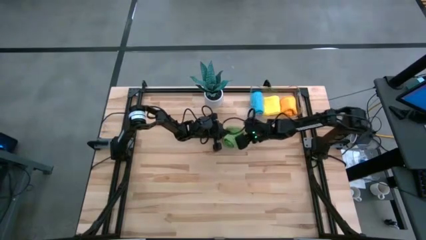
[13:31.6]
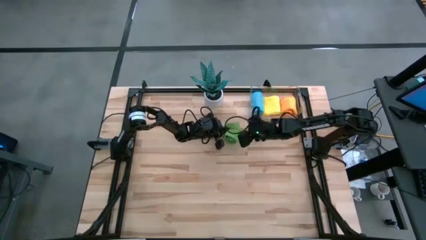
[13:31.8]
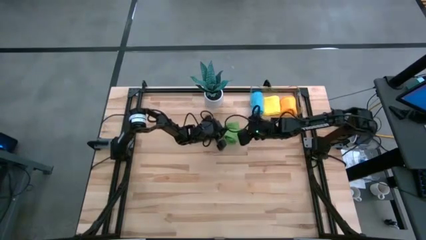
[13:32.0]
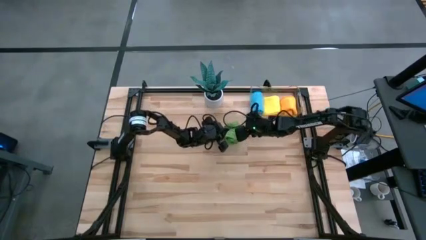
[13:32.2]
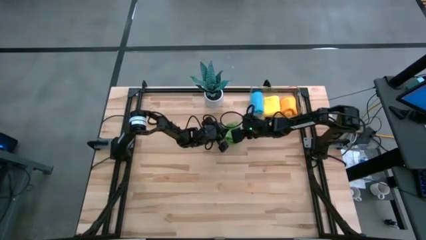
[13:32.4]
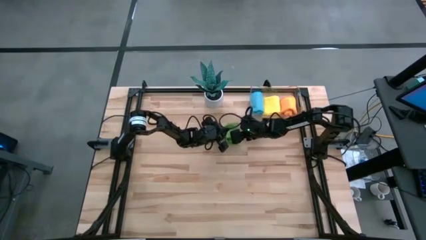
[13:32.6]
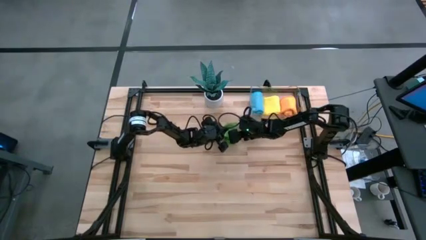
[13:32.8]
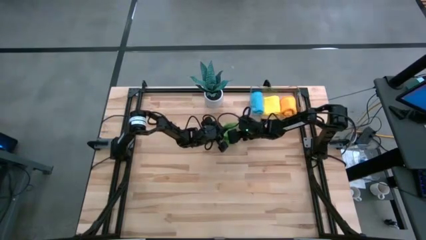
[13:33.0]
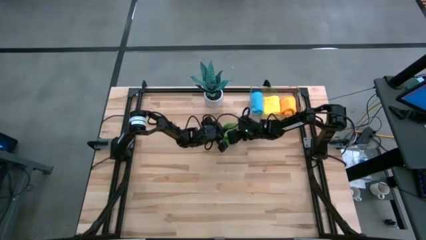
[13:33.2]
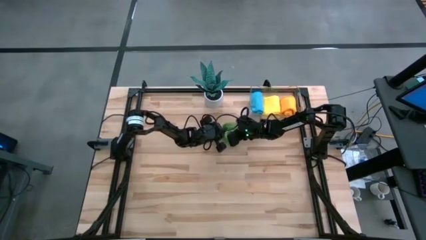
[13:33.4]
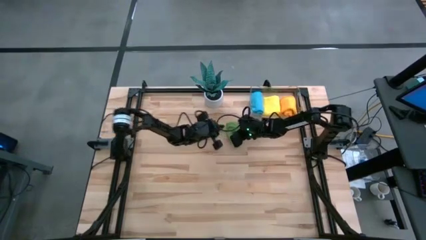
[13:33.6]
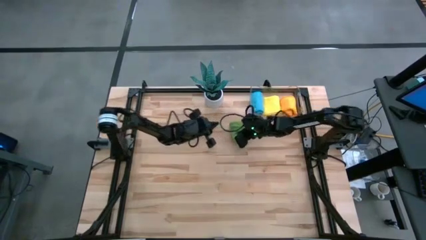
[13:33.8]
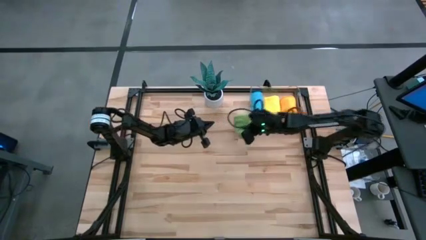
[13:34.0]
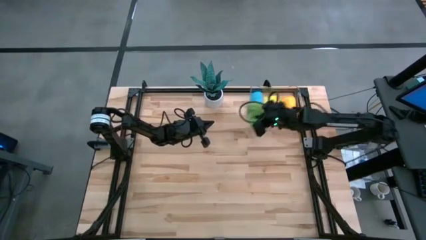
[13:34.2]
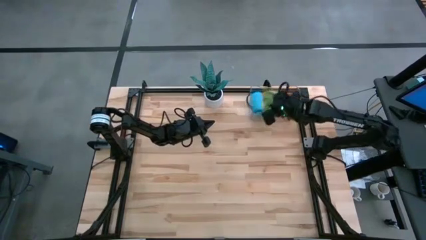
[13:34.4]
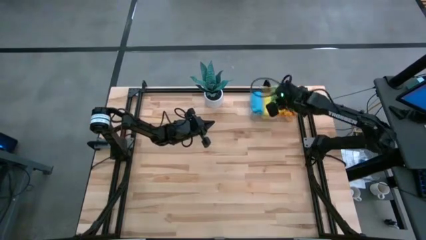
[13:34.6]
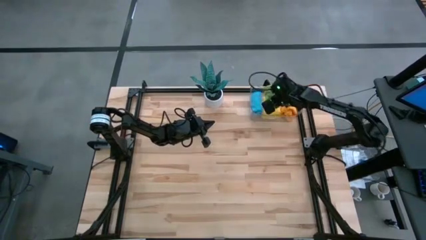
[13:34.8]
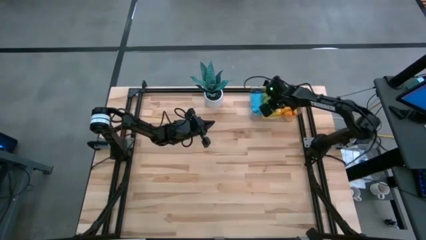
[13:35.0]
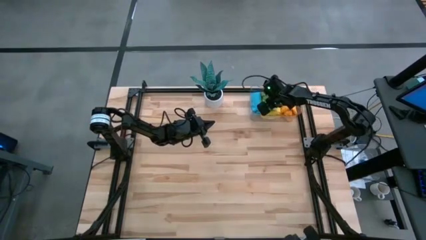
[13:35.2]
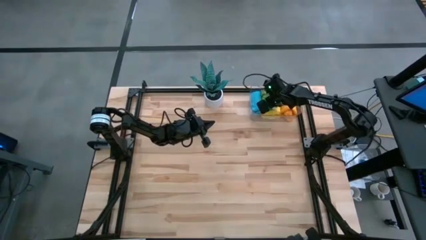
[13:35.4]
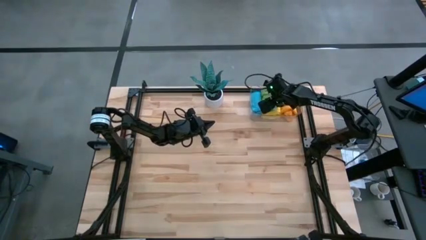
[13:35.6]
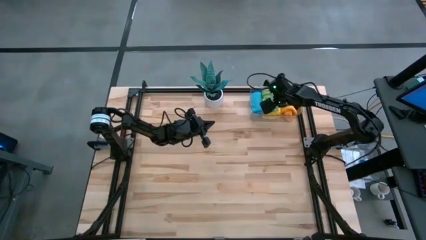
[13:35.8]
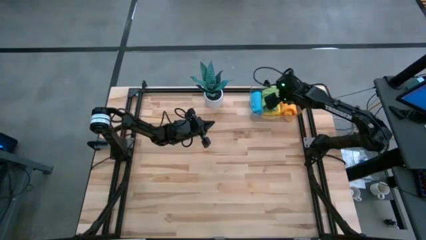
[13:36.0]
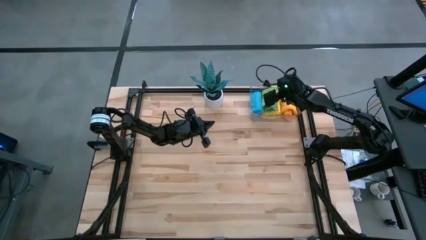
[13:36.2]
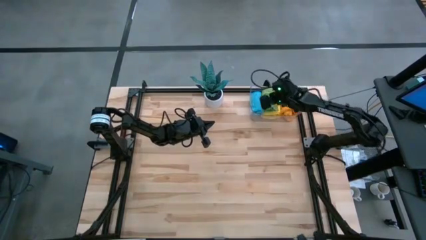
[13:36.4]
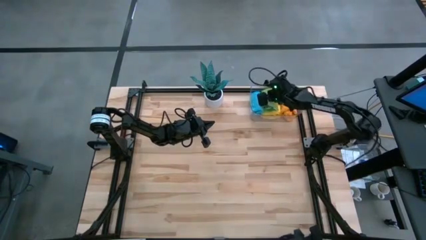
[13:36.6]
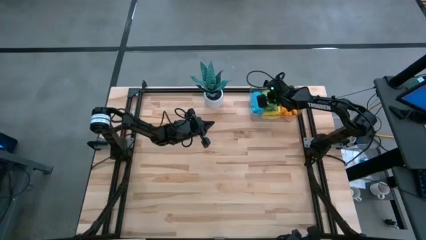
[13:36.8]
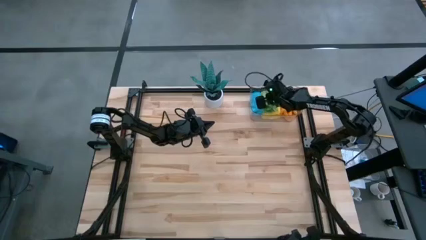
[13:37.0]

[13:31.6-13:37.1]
Task: Roll microfiber towels into tight, uniform cylinder then place into a basket
Put the green microfiber cloth into the transparent bin

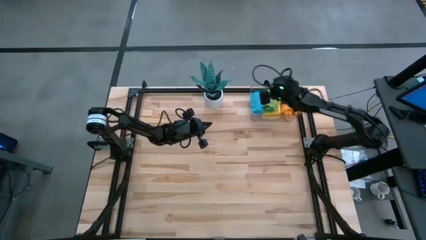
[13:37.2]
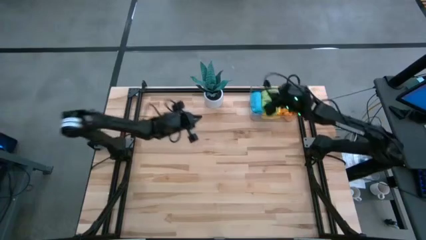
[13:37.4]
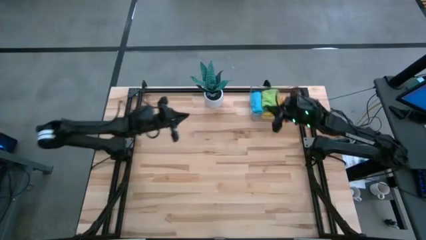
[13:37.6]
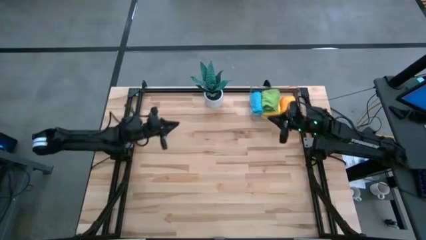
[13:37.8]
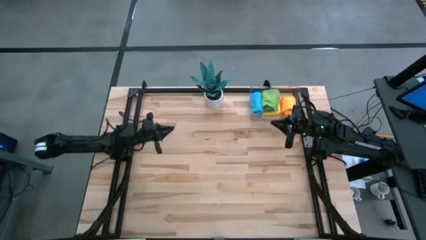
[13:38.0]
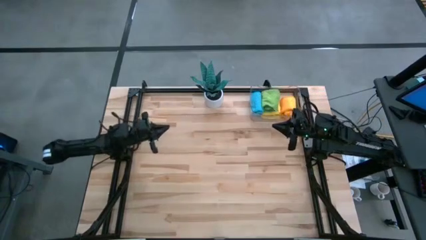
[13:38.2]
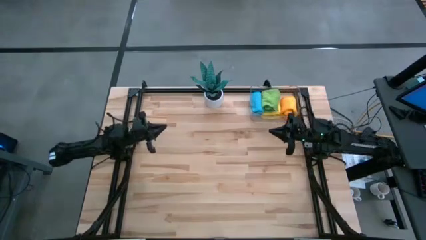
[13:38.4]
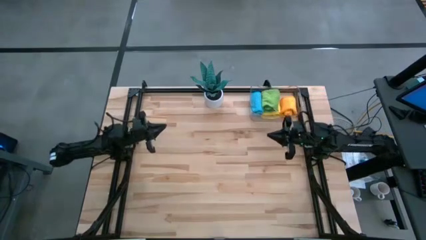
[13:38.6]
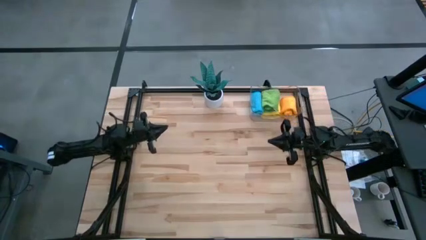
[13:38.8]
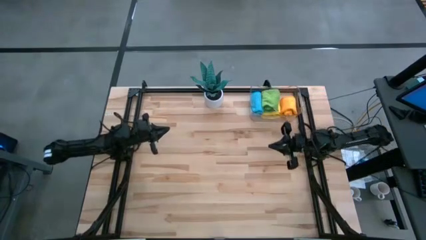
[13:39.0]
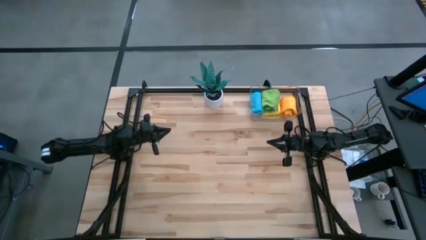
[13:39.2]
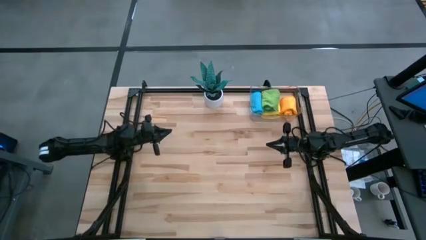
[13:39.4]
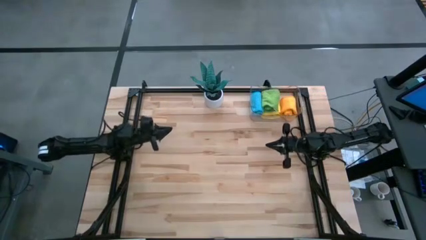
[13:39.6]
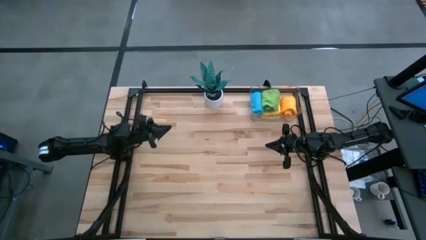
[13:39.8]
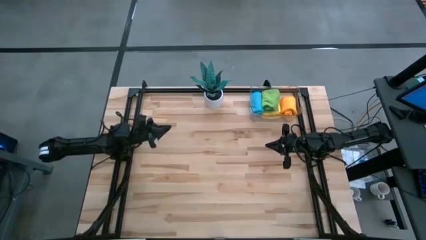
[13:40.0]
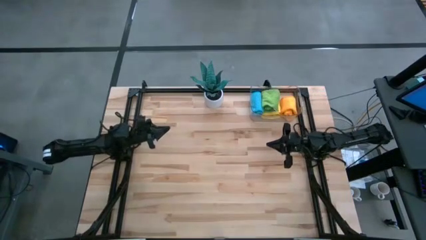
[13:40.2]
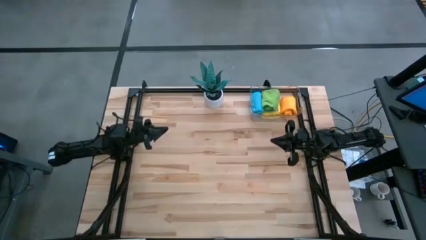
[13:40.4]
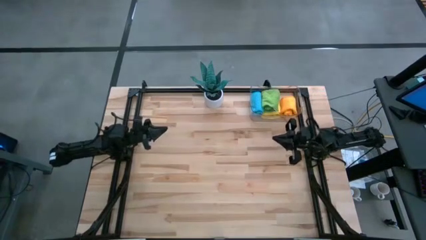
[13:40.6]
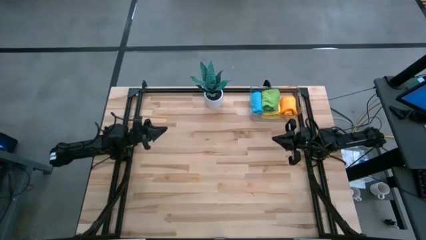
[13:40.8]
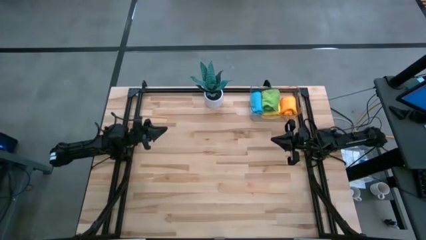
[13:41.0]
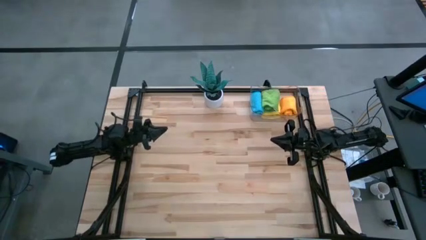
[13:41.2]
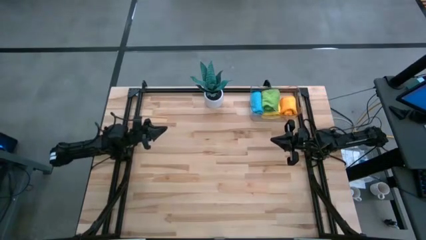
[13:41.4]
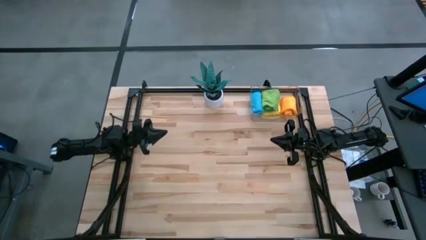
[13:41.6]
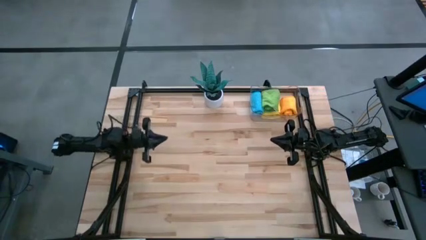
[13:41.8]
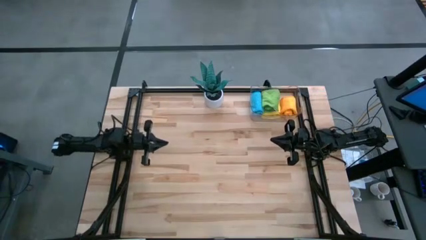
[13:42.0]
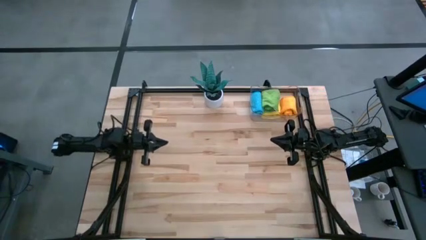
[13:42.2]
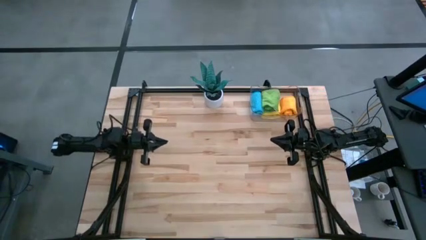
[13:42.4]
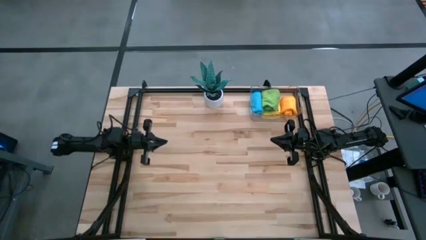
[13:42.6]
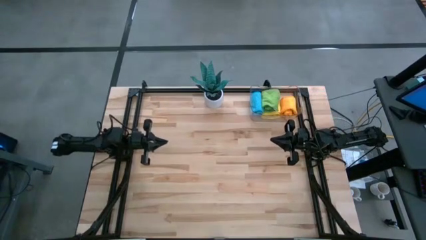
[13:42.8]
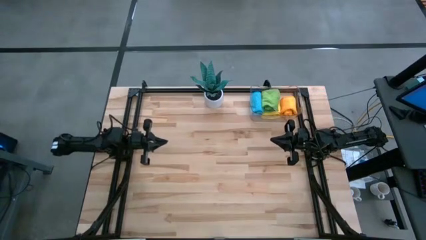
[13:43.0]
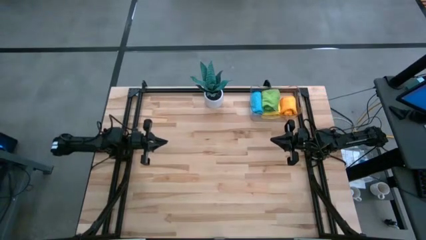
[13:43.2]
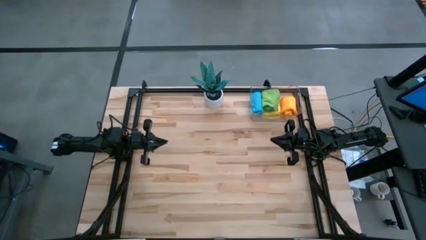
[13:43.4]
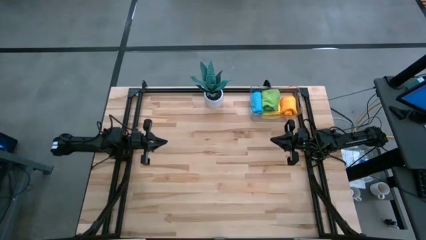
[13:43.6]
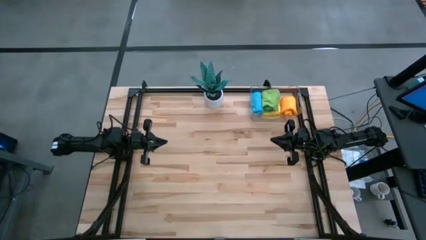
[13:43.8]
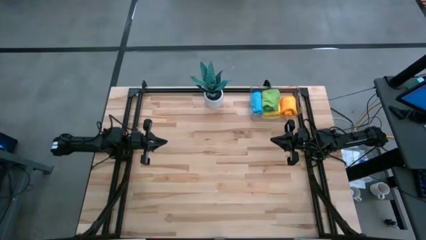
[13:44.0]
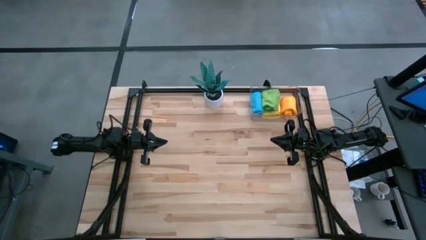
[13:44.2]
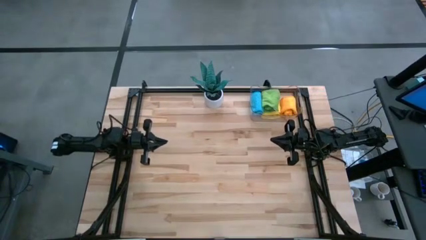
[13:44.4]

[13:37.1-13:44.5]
Return to Home Position

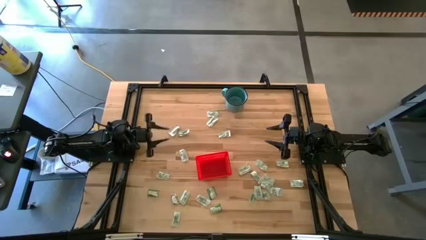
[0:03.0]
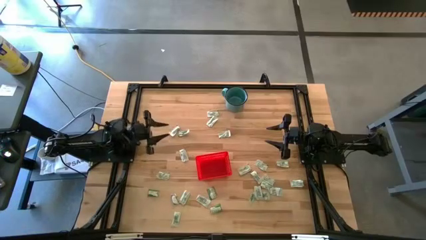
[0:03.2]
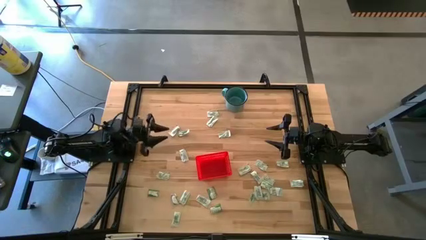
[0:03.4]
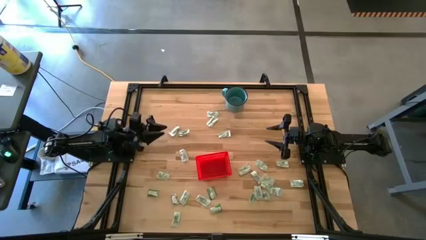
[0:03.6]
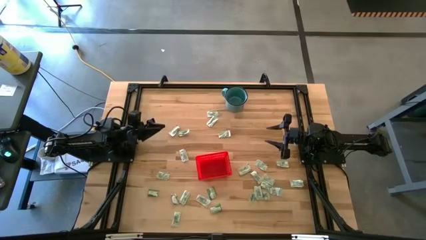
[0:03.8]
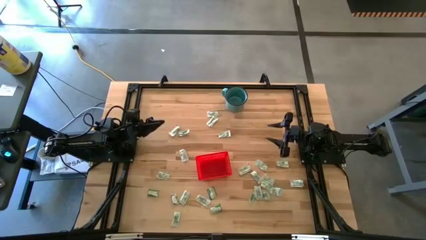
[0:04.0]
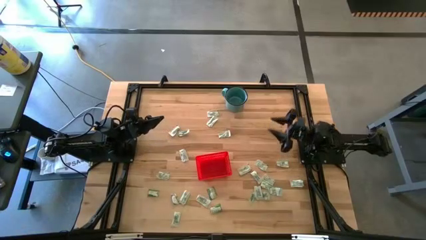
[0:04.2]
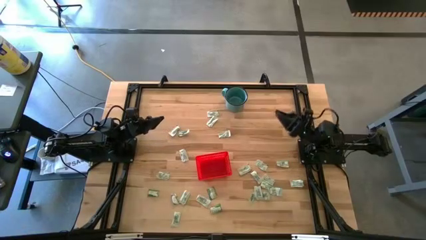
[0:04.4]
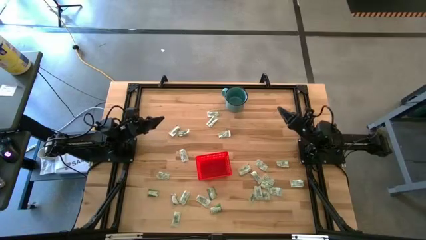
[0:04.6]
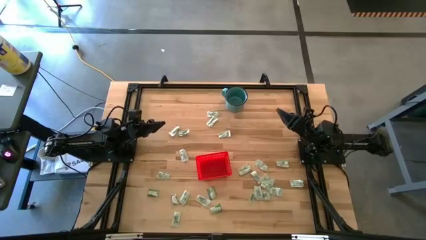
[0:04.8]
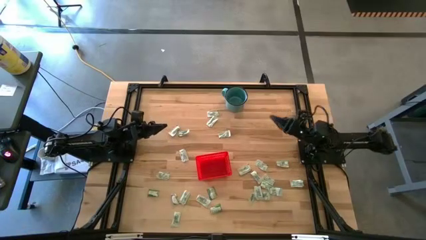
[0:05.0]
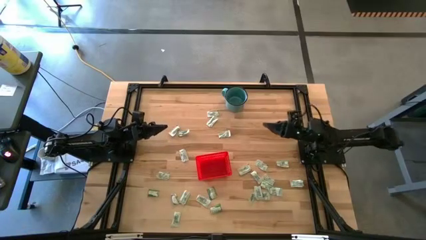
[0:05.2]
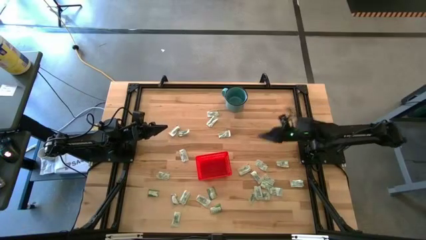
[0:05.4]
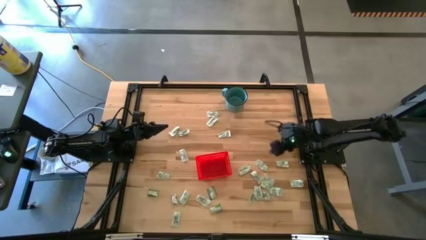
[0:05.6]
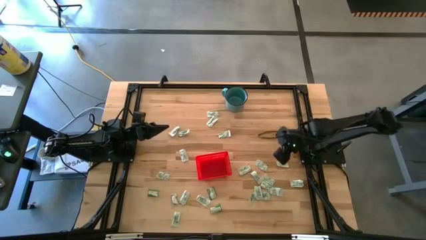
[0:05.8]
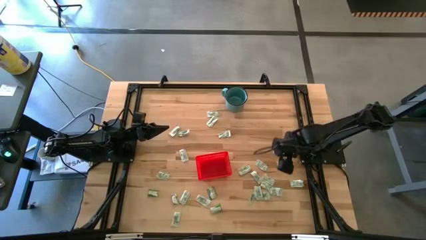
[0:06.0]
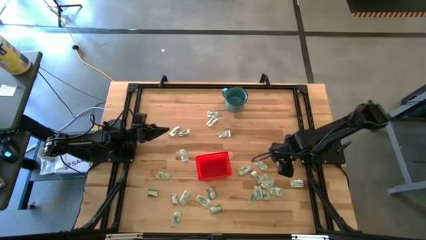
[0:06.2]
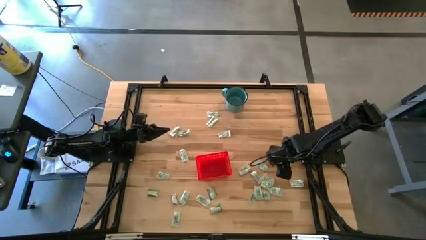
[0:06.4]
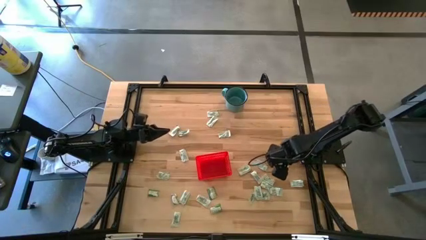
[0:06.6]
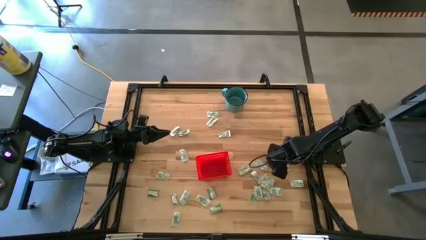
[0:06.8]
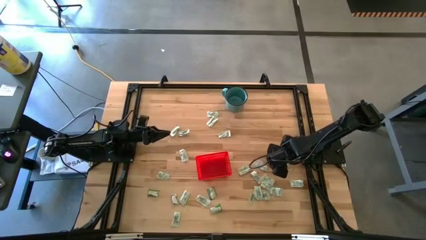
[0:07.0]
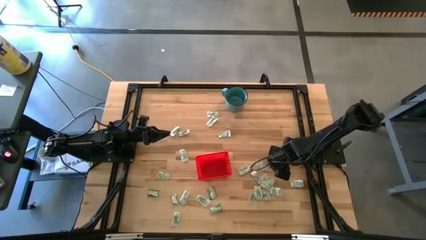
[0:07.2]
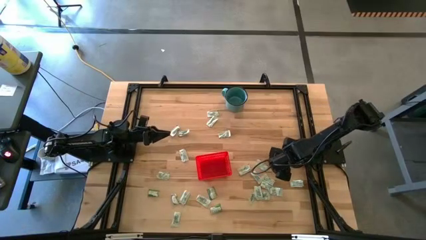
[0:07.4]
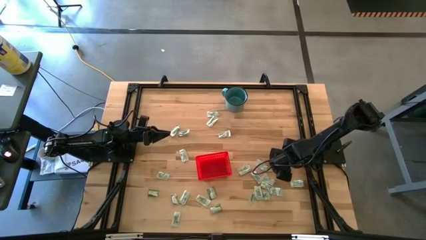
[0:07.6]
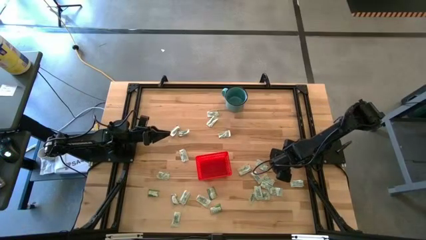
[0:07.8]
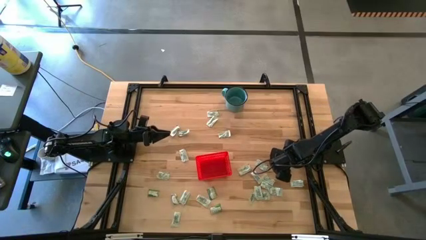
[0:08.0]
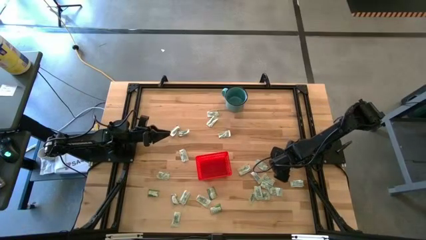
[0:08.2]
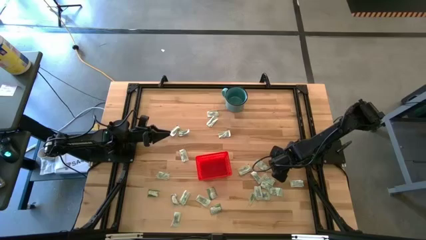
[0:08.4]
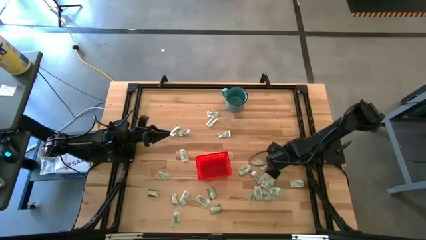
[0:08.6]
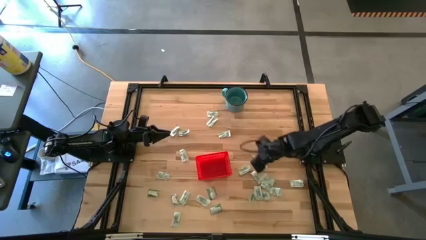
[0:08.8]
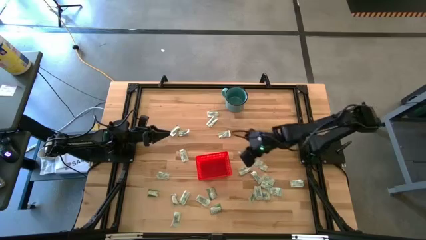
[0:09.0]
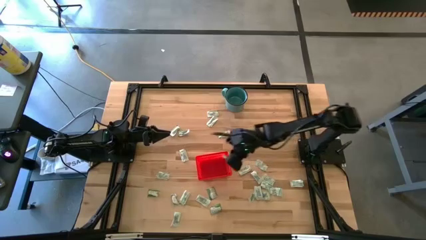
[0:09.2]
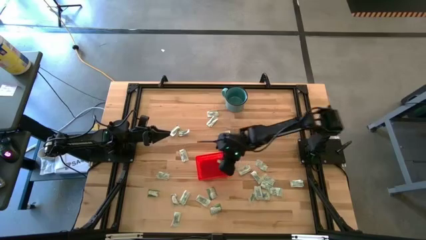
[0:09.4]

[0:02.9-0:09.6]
Task: Pick and place Stevia / Truvia into bins
Put the green stevia packet into the red bin
